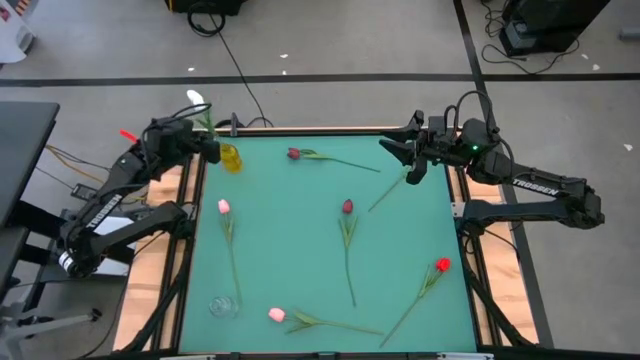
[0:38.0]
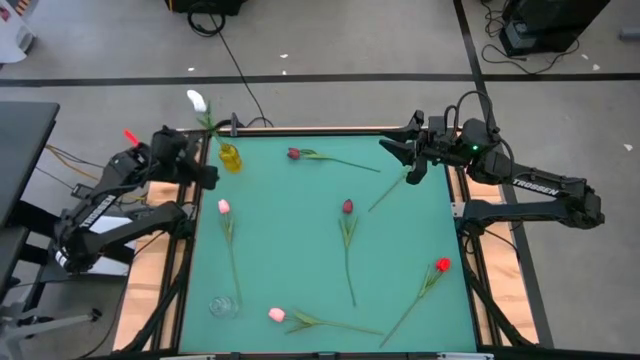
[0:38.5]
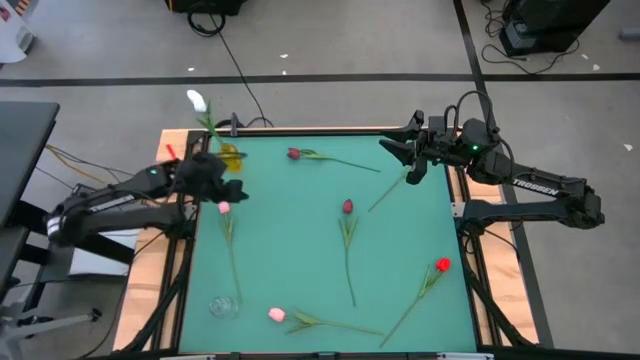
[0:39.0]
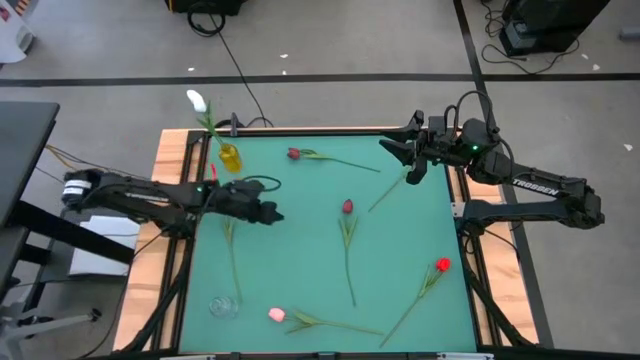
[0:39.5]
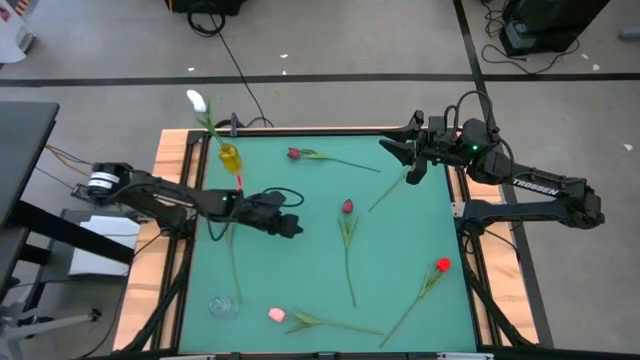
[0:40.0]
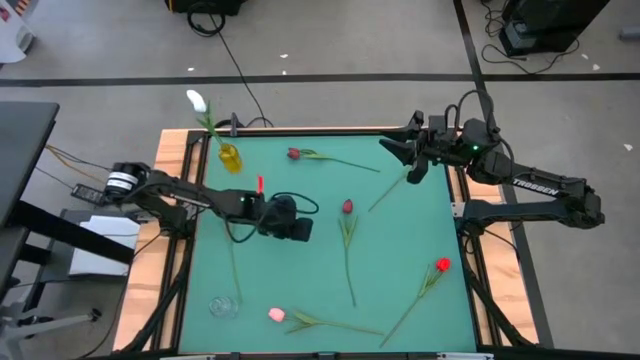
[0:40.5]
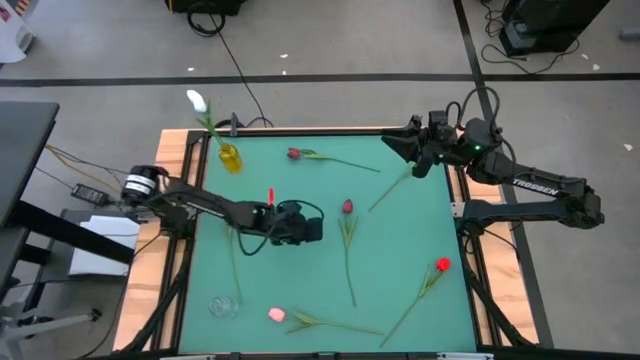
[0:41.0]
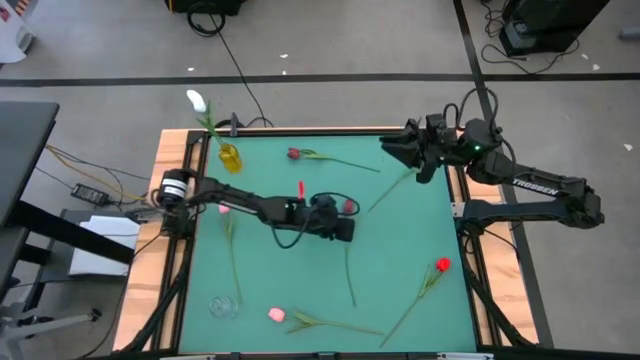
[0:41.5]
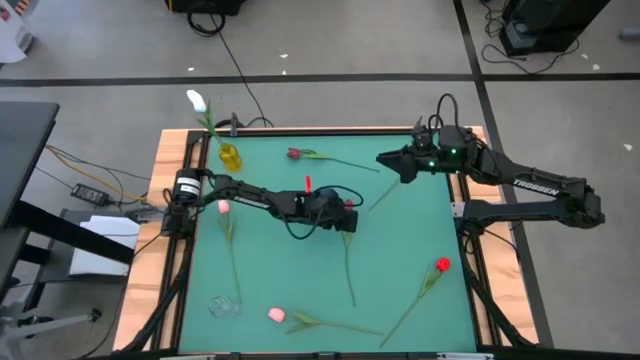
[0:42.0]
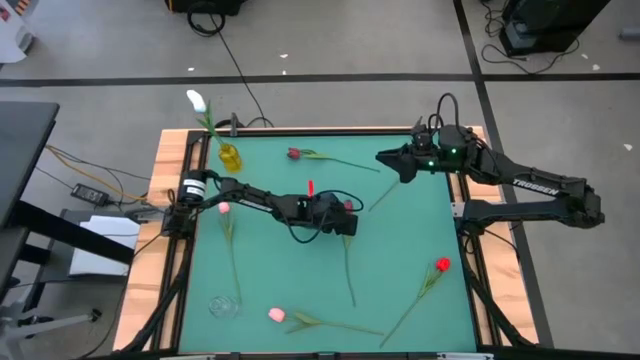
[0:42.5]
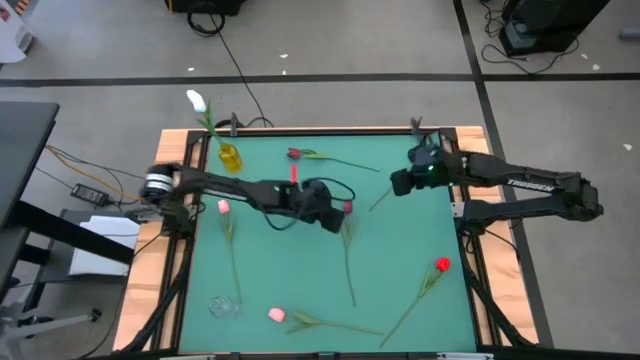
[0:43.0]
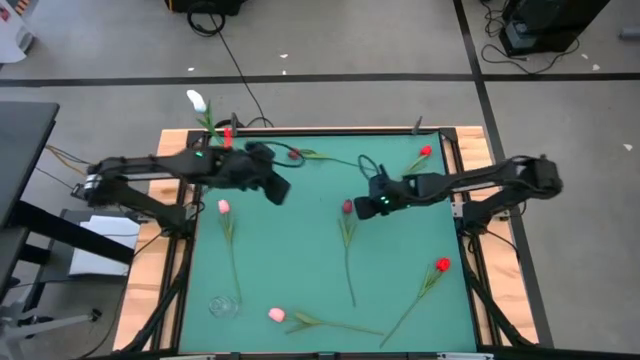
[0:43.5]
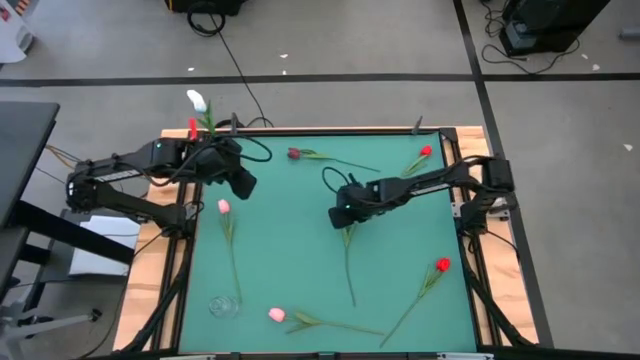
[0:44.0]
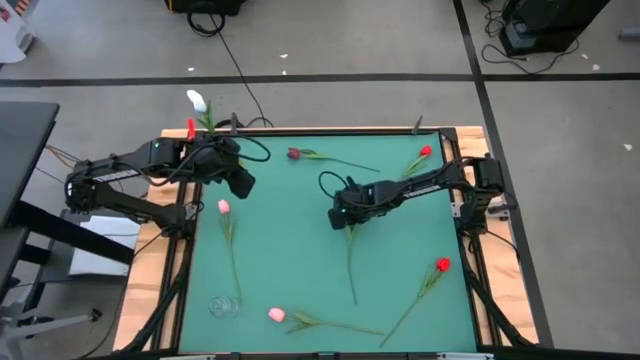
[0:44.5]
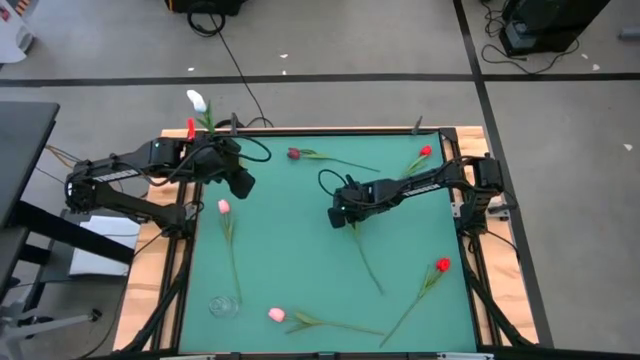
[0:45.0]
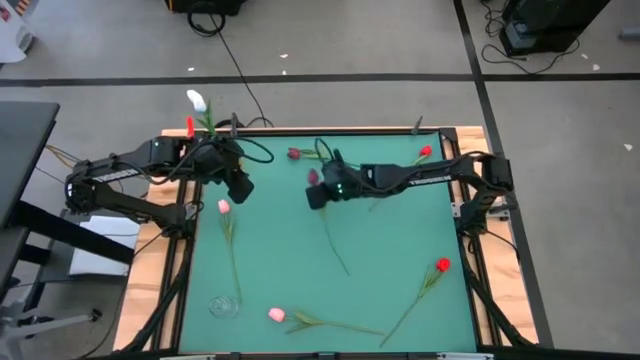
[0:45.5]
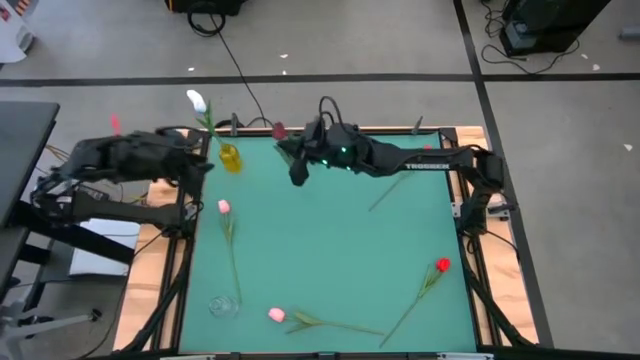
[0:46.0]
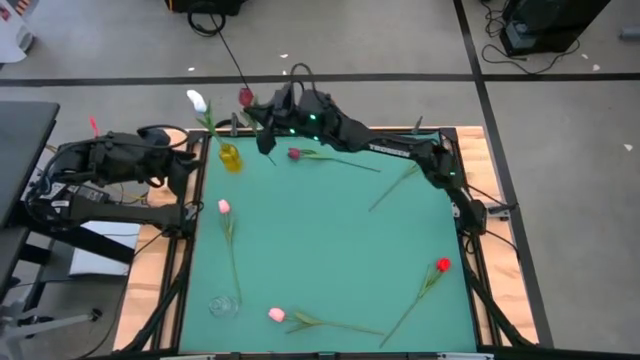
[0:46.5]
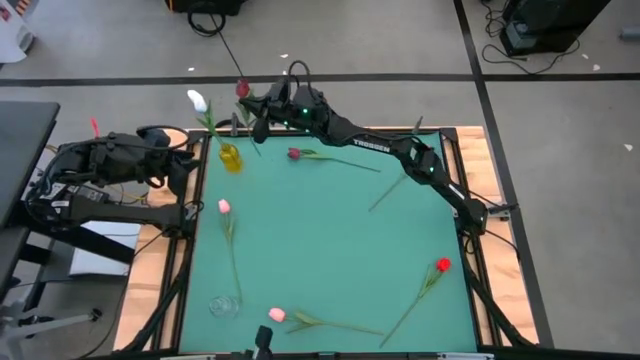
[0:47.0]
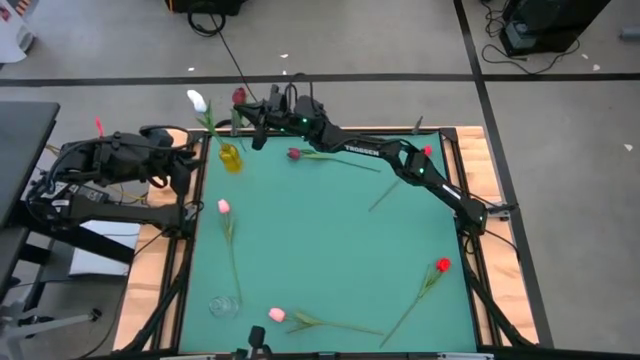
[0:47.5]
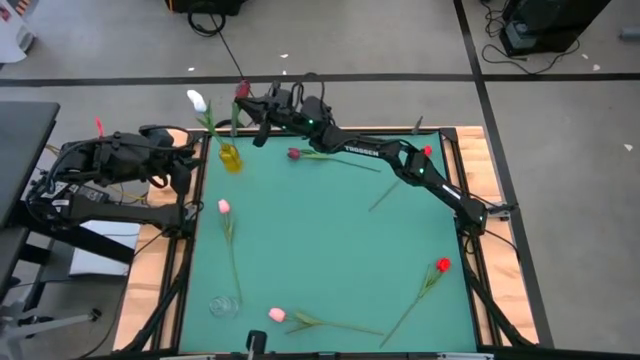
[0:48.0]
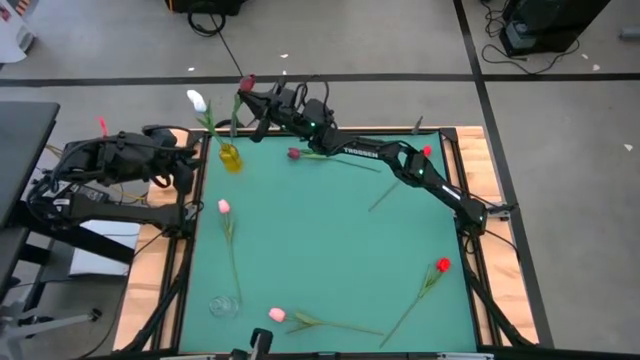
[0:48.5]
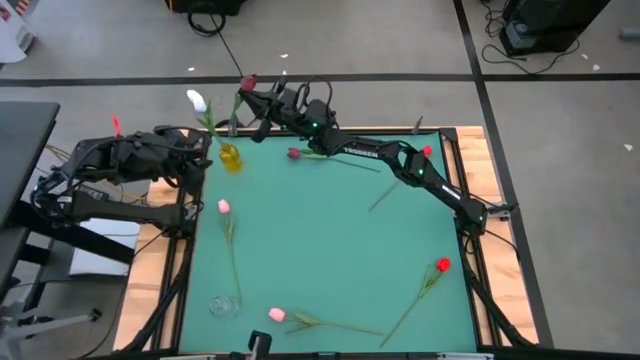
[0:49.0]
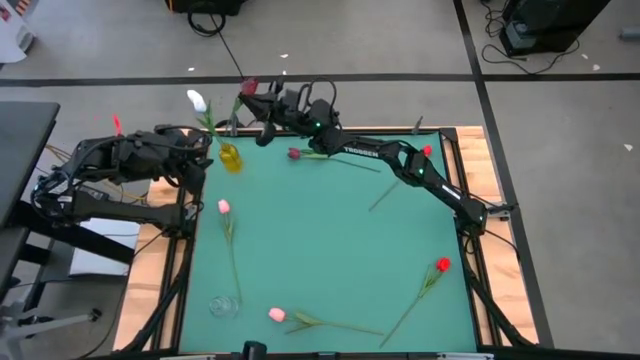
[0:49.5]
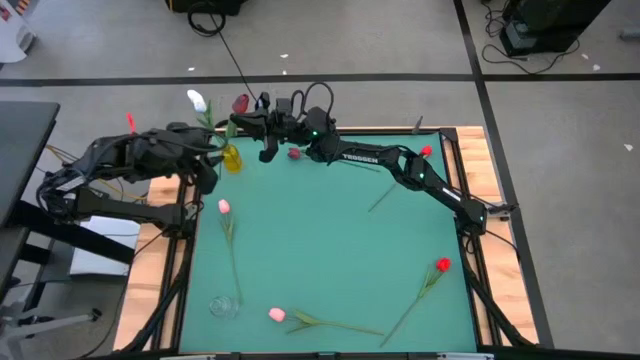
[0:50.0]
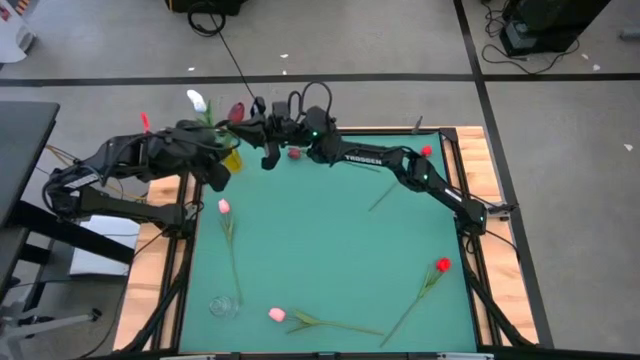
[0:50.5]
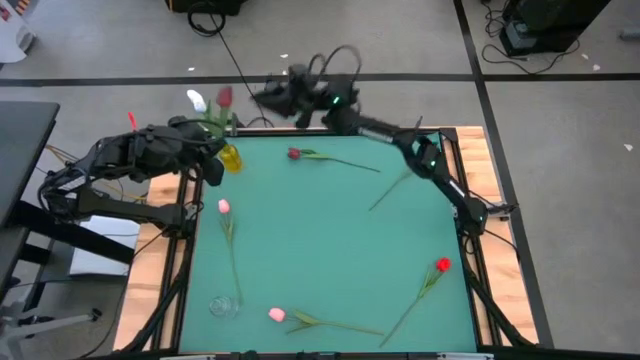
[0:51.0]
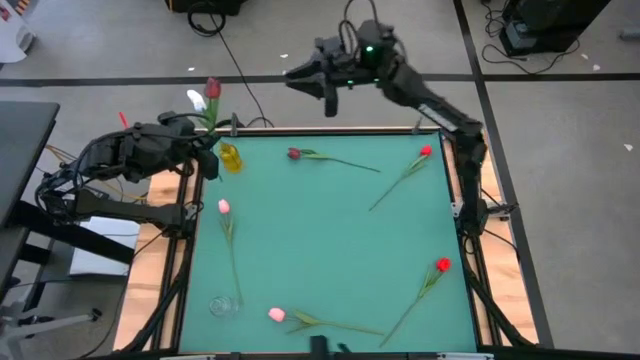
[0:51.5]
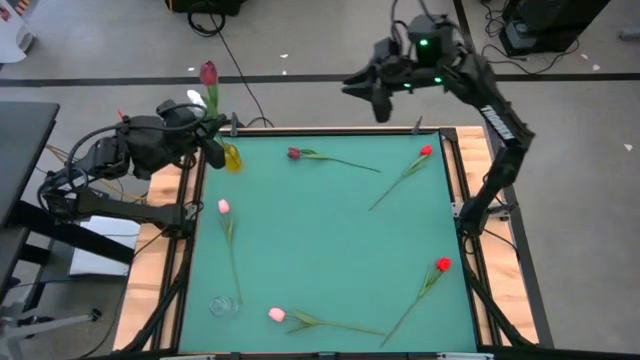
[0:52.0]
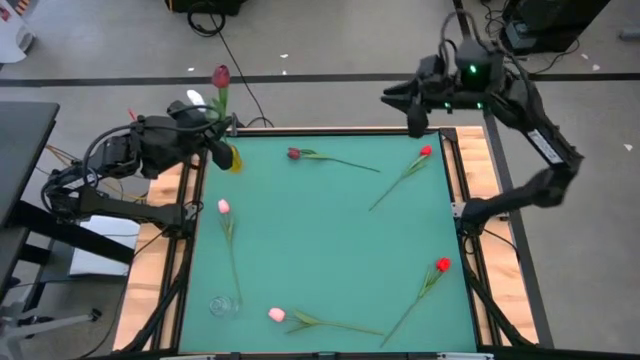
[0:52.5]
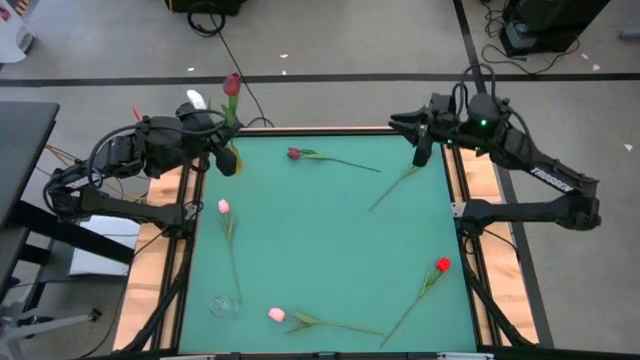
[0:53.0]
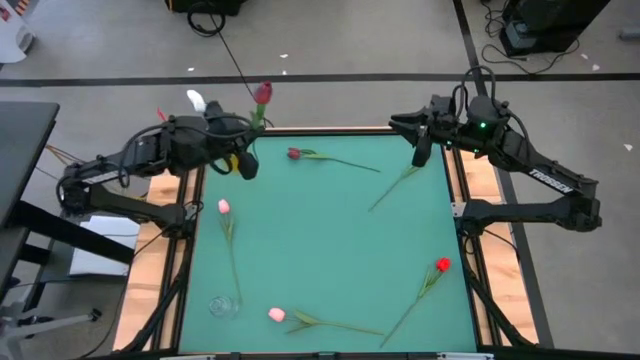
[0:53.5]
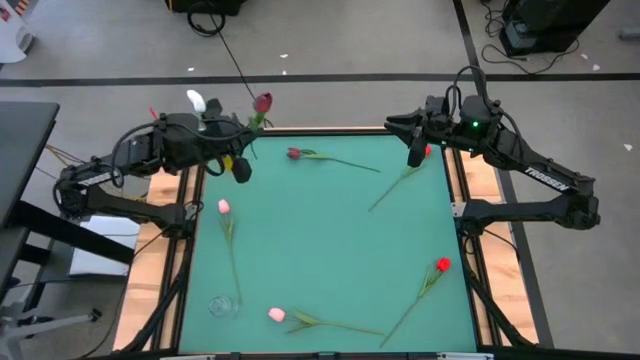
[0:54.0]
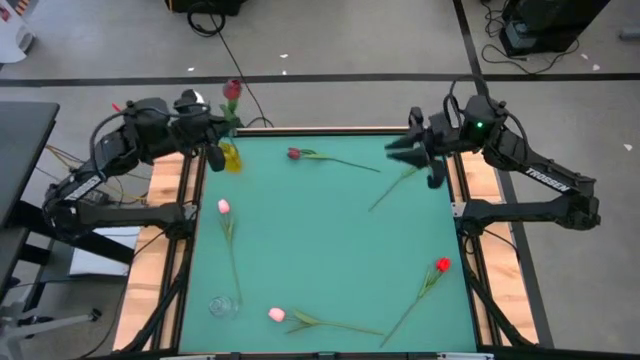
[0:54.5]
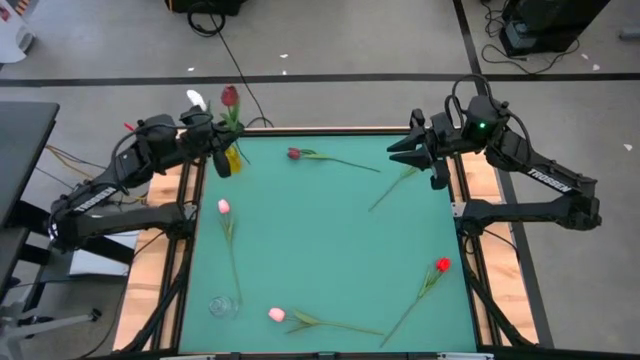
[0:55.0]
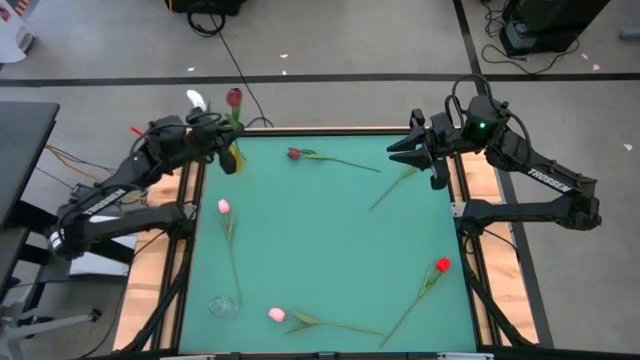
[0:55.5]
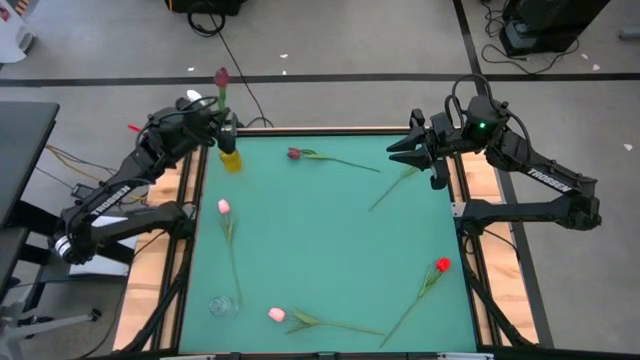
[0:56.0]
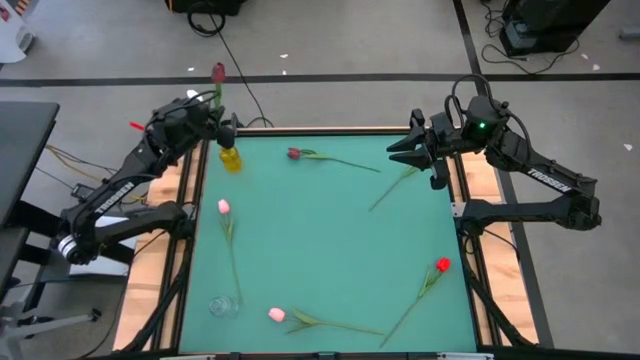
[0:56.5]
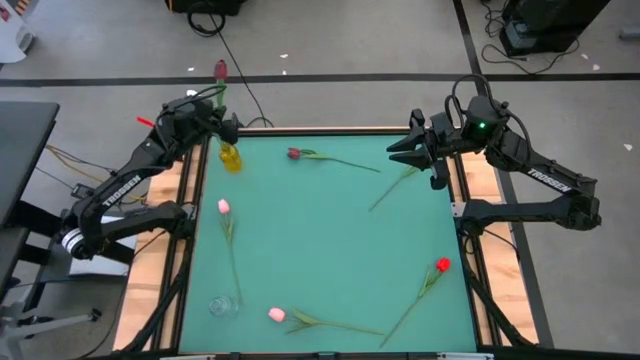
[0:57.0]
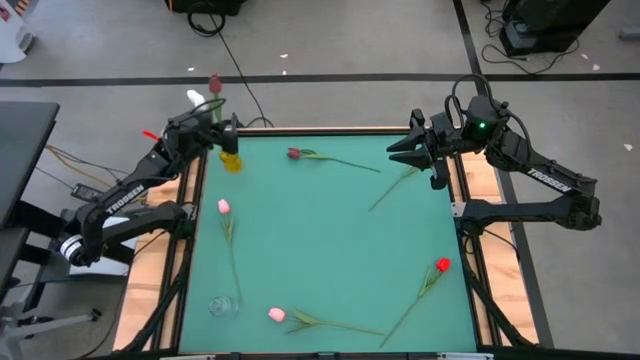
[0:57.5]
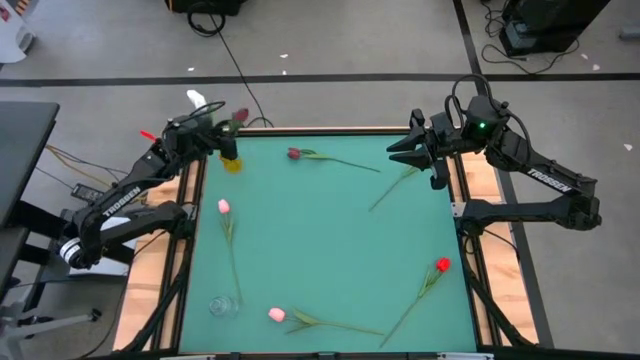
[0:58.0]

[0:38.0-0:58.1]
Task: Sort flowers into vase by color
Put the bottom dark red flower into the yellow vase
